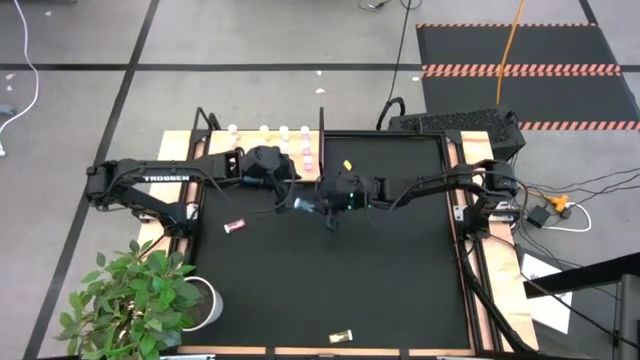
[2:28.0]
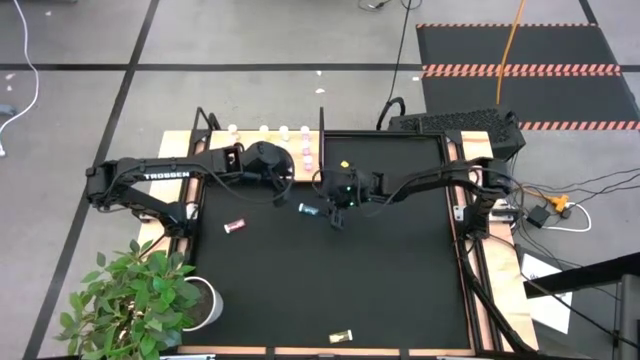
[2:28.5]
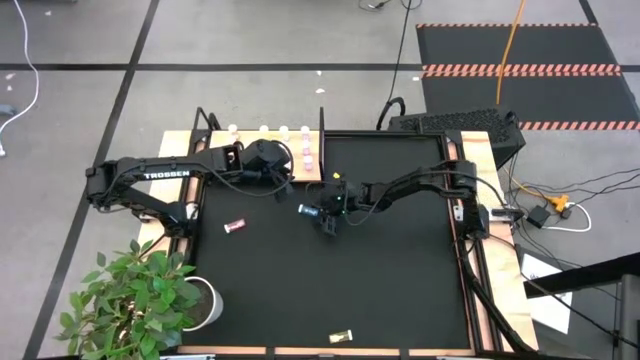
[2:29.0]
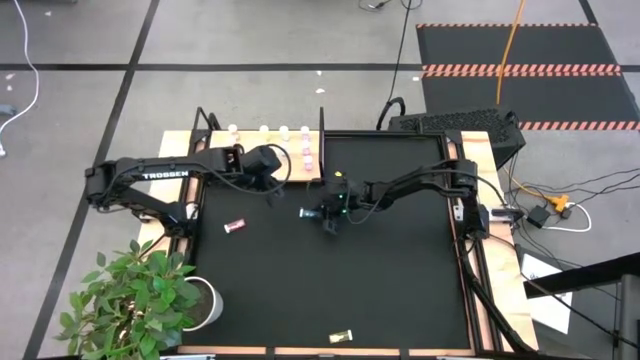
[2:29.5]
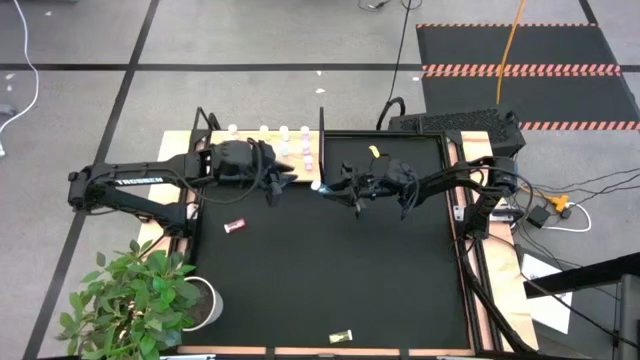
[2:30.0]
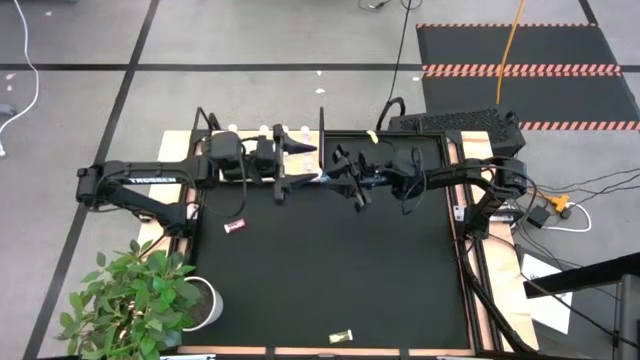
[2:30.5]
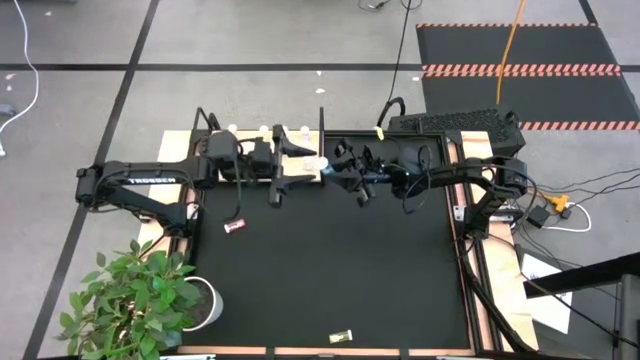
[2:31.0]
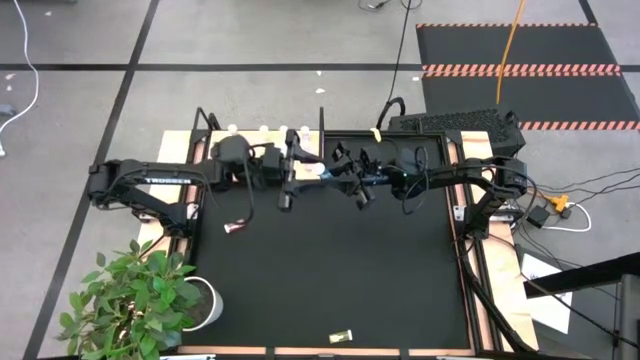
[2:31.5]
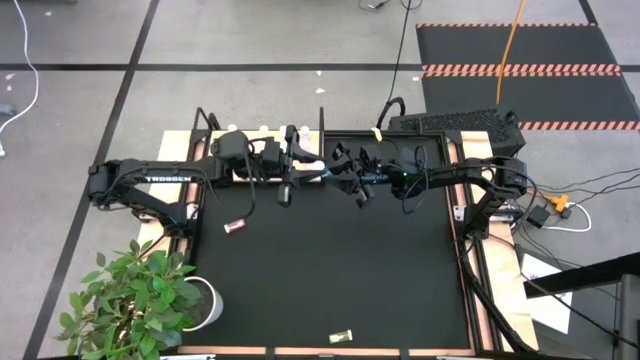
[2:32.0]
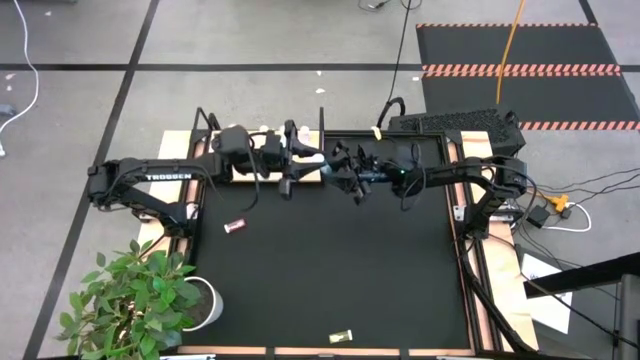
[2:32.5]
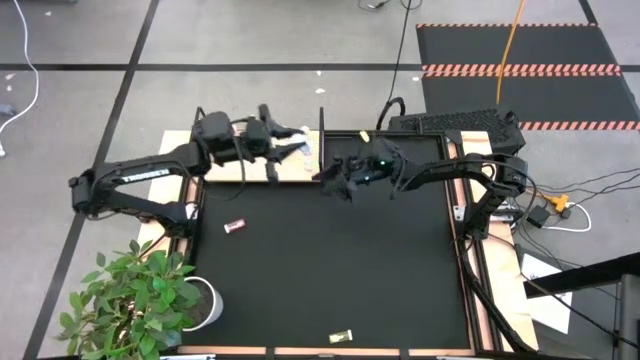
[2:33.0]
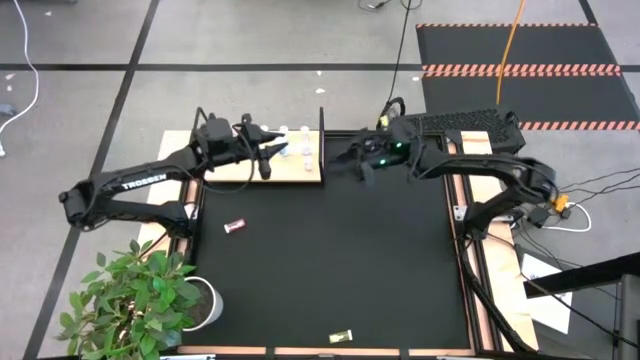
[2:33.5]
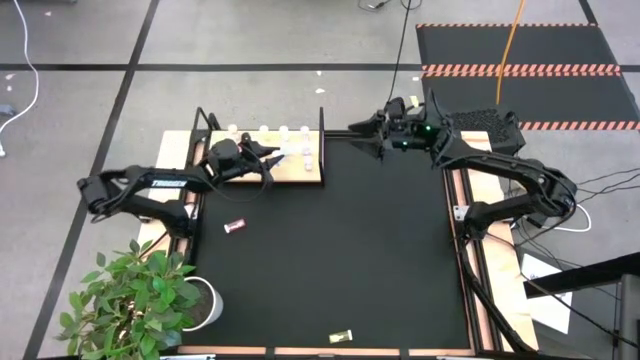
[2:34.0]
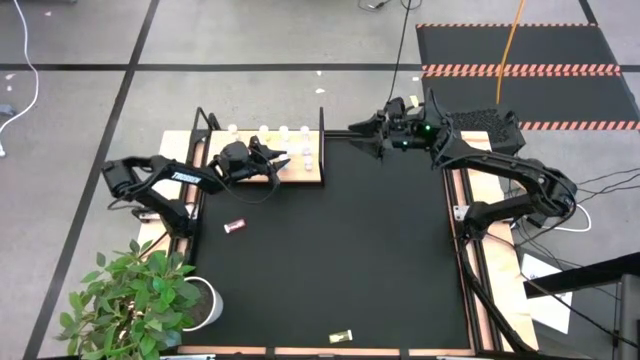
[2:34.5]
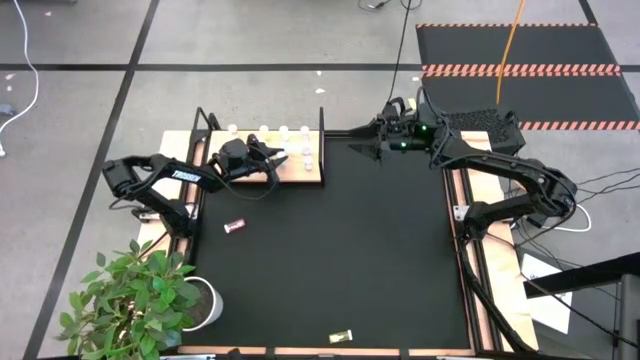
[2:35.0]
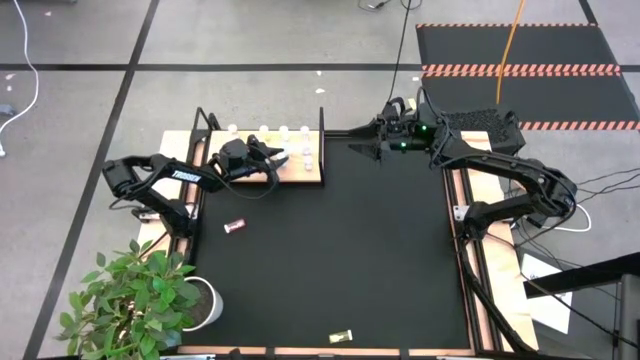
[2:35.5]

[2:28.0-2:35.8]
Task: Pick and place medicine bottles onto shelf by color
Put the blue pill bottle on the shelf aligned with the other blue pill bottles

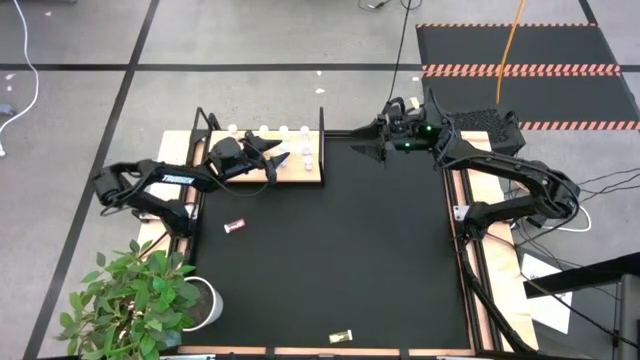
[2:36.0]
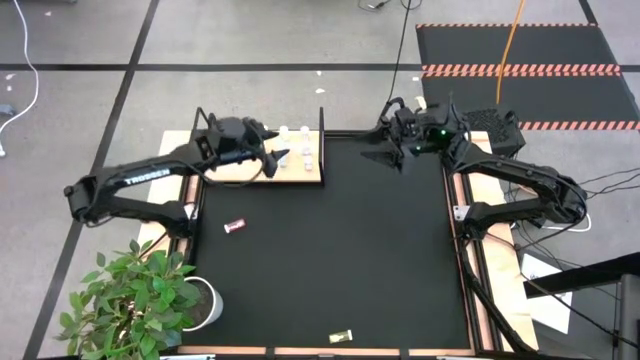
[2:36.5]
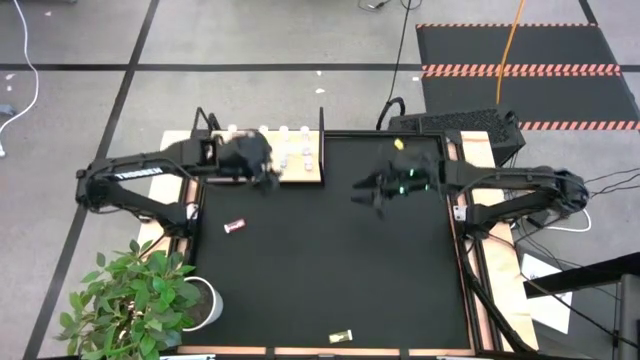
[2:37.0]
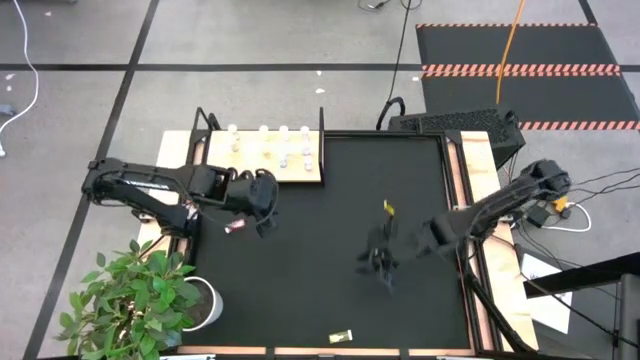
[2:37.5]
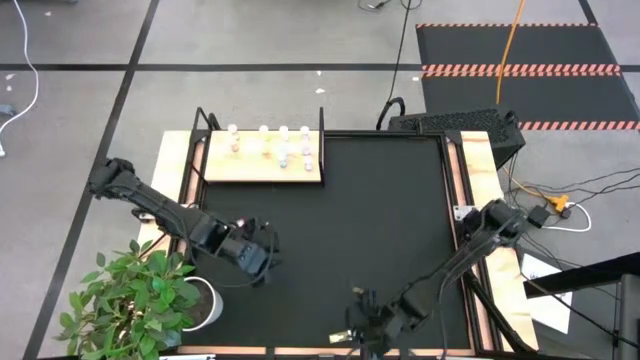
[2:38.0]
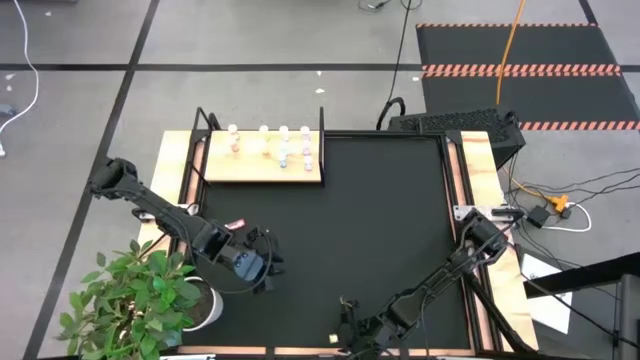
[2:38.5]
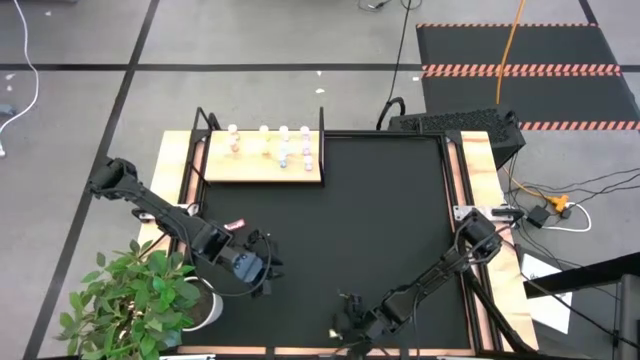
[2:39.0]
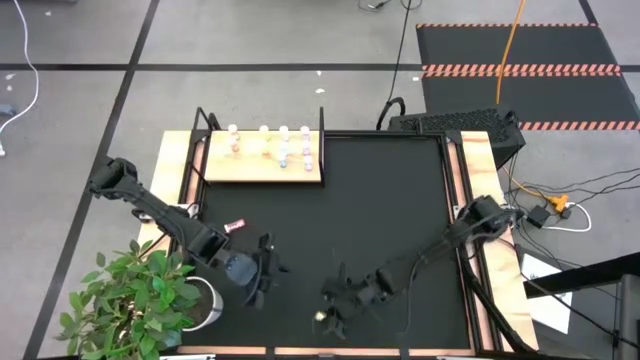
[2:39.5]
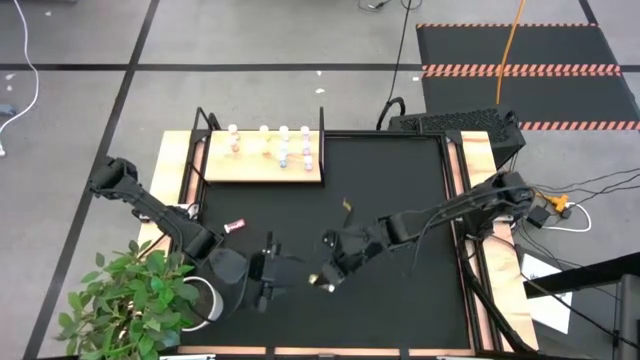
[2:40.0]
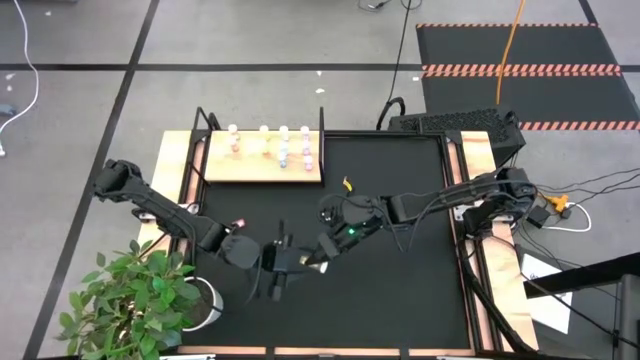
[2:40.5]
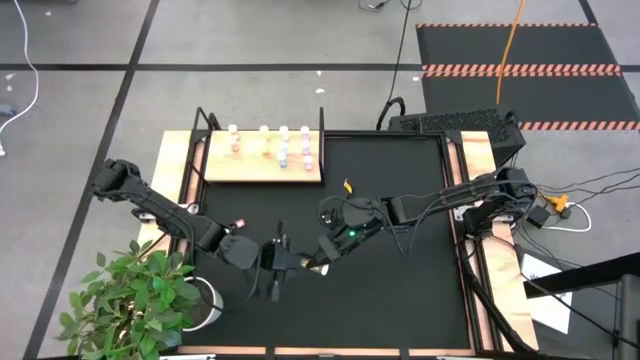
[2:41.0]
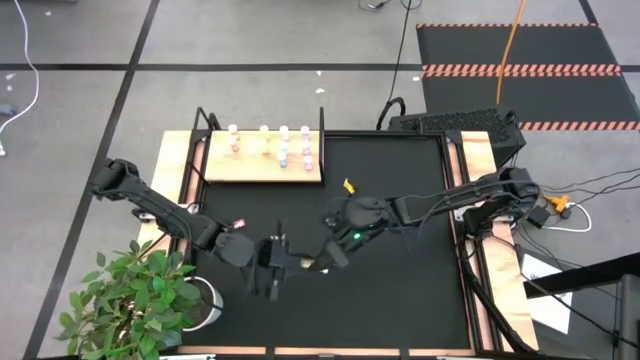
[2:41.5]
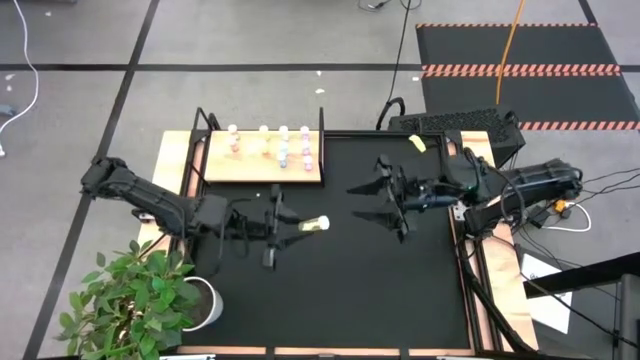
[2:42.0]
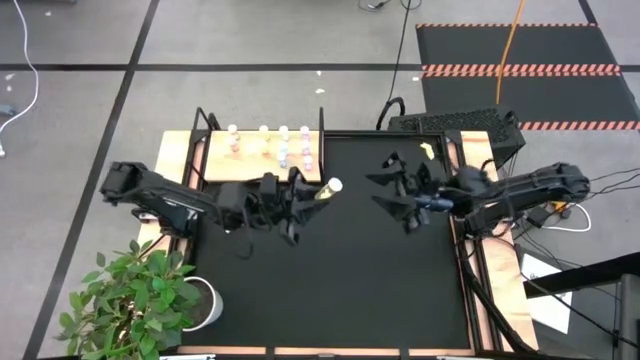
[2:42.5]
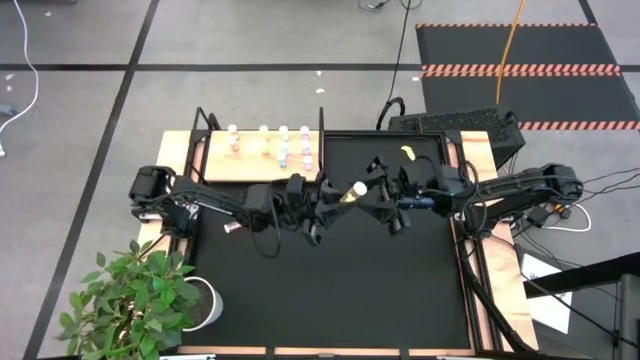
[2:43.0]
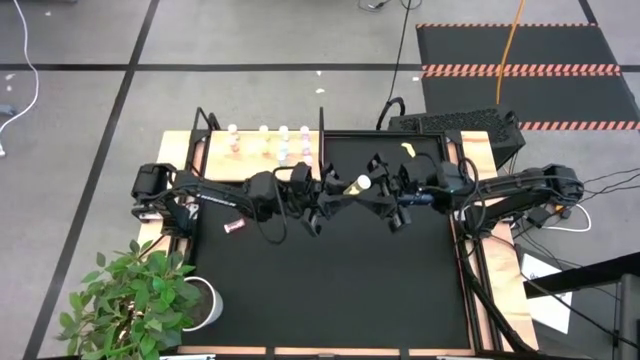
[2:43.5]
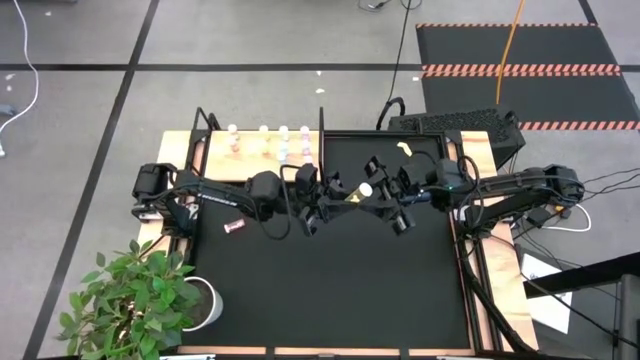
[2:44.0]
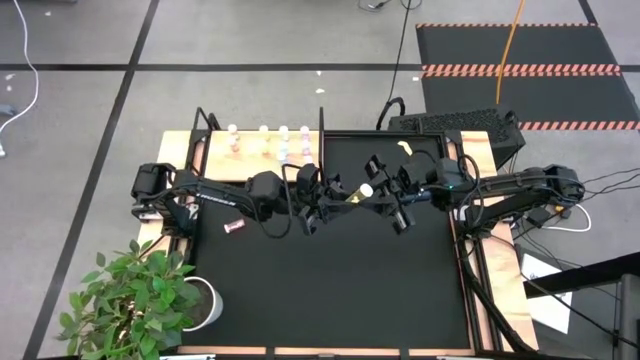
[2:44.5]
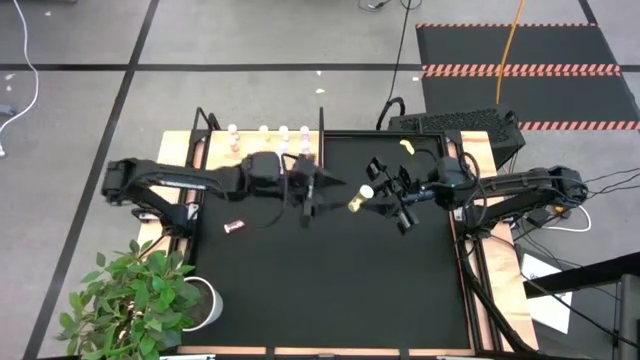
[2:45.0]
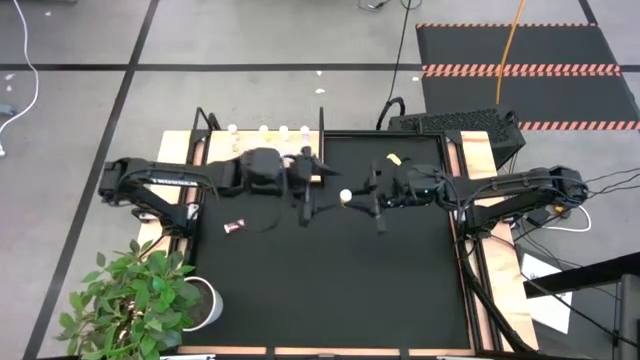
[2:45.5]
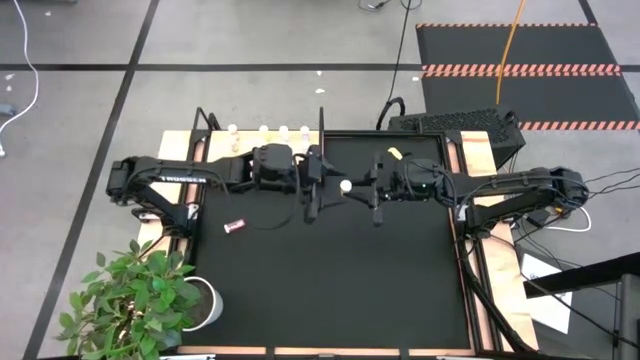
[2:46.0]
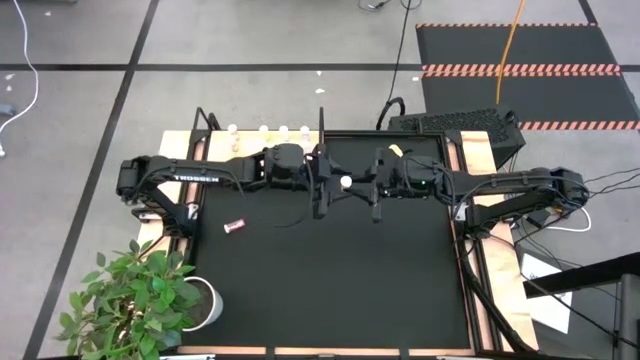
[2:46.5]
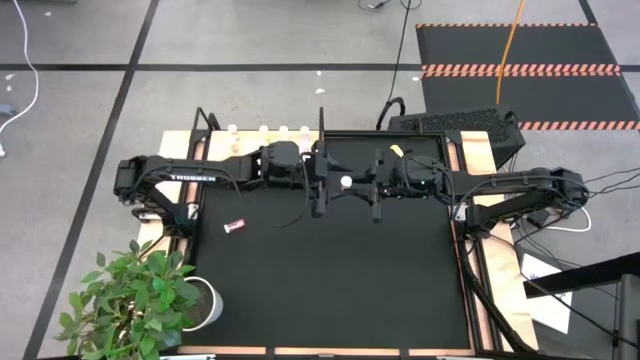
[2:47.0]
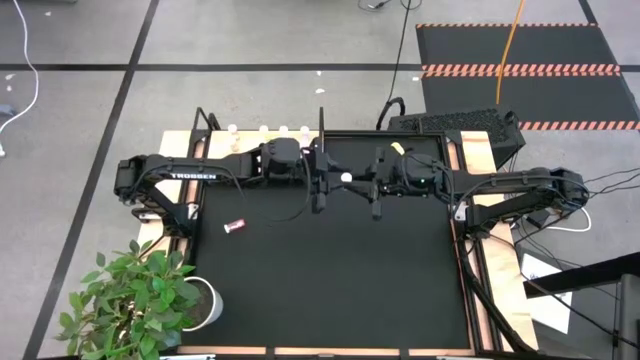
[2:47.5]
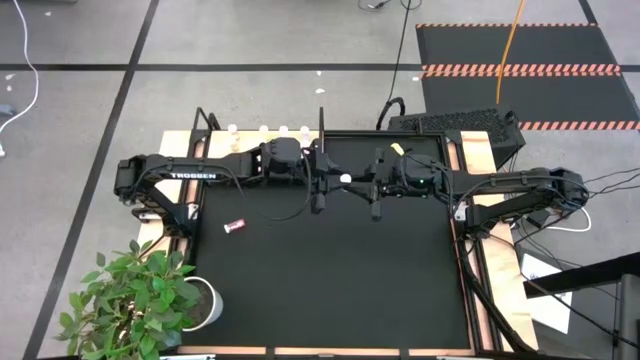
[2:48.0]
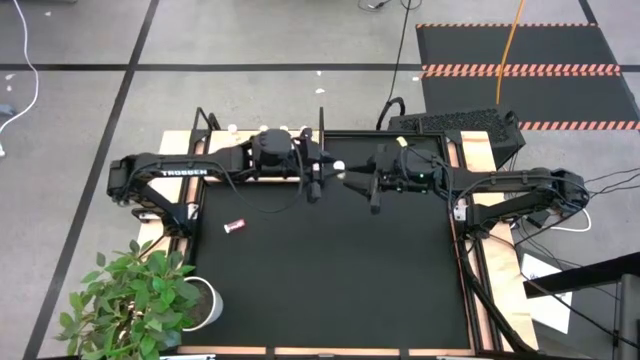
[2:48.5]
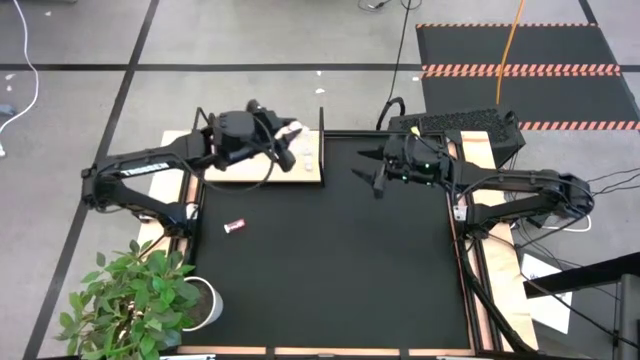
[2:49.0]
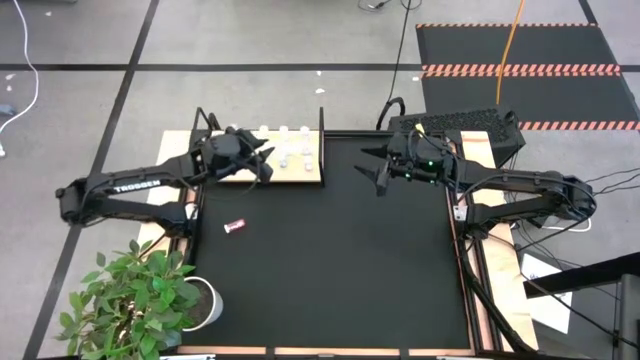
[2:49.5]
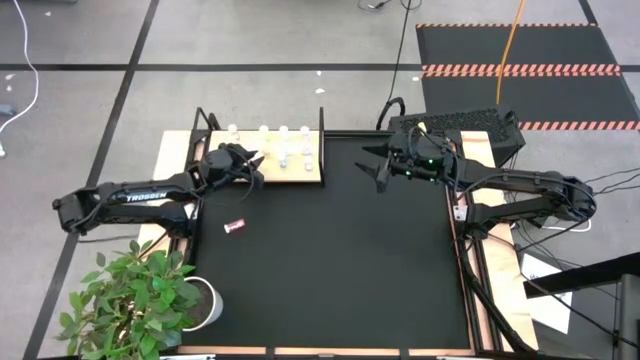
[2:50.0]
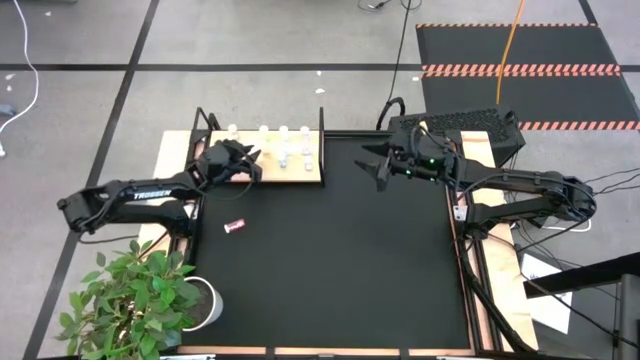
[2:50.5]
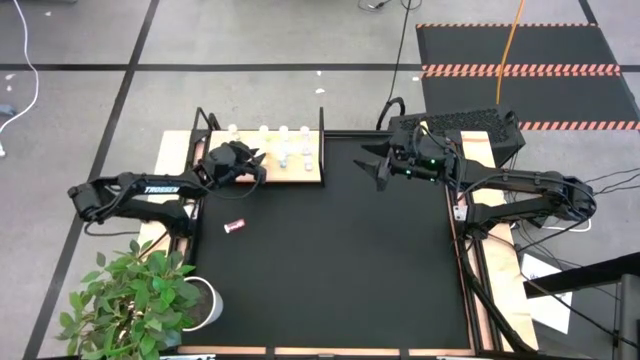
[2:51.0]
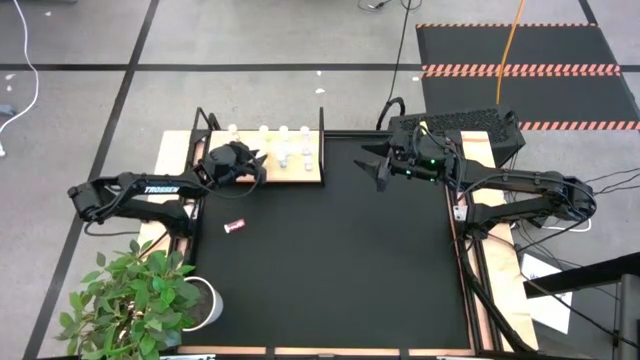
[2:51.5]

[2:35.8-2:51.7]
Put the yellow pill bottle on the shelf aligned with the other yellow pill bottles
